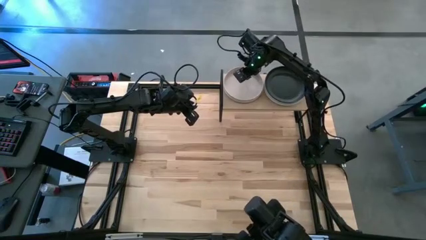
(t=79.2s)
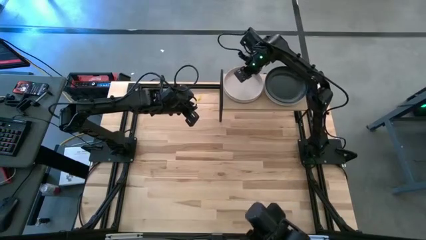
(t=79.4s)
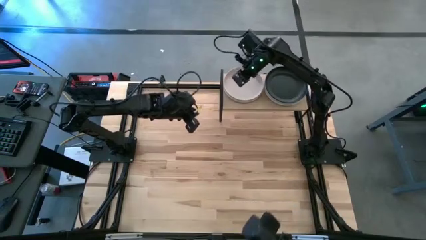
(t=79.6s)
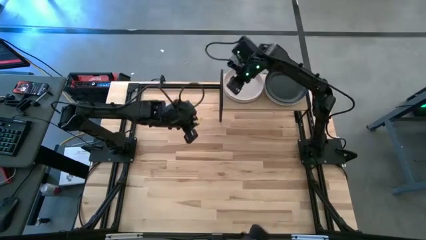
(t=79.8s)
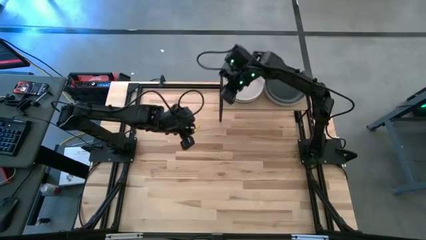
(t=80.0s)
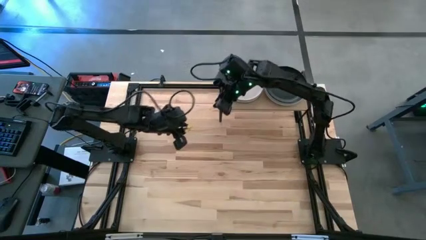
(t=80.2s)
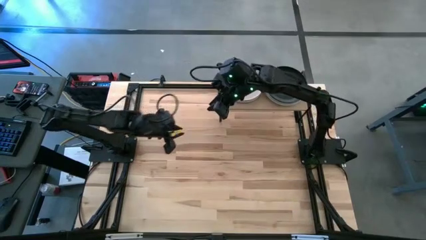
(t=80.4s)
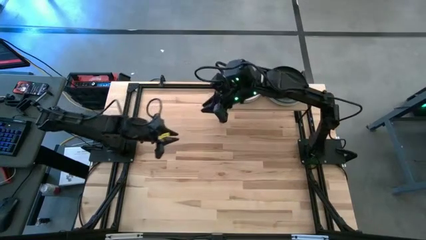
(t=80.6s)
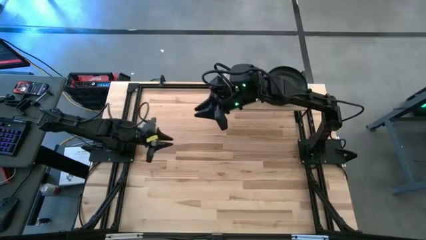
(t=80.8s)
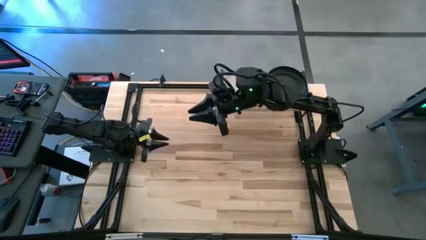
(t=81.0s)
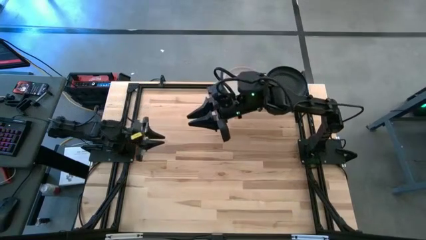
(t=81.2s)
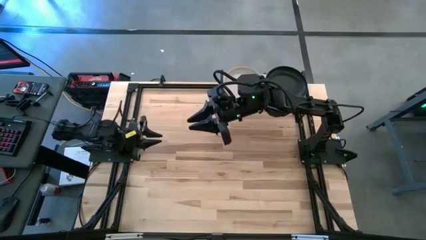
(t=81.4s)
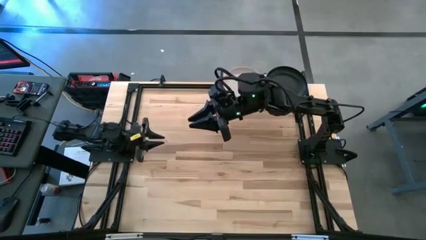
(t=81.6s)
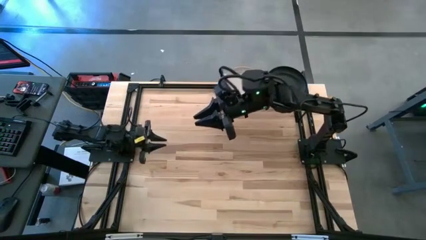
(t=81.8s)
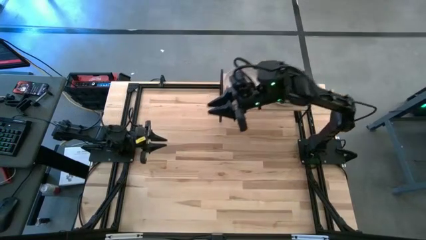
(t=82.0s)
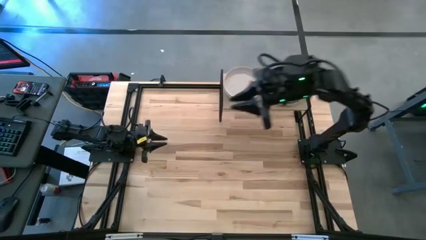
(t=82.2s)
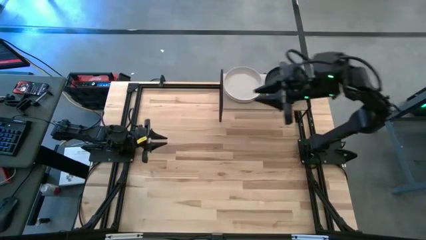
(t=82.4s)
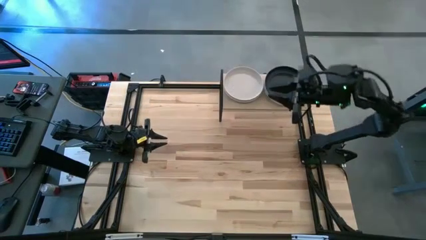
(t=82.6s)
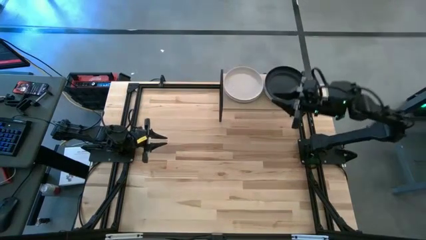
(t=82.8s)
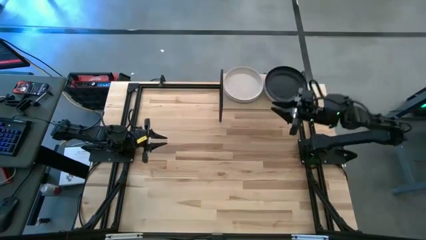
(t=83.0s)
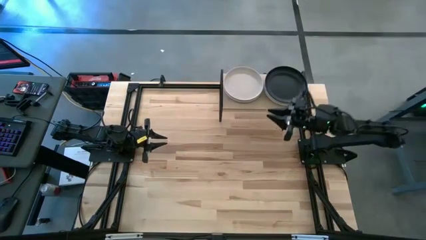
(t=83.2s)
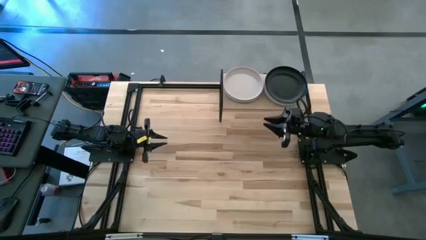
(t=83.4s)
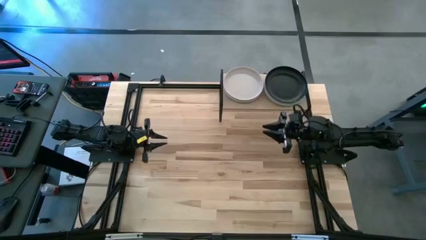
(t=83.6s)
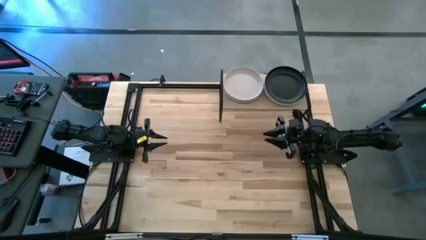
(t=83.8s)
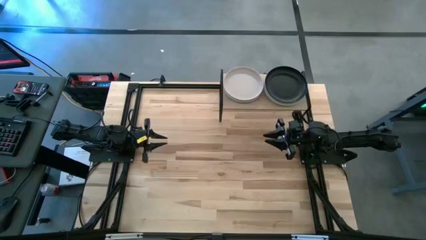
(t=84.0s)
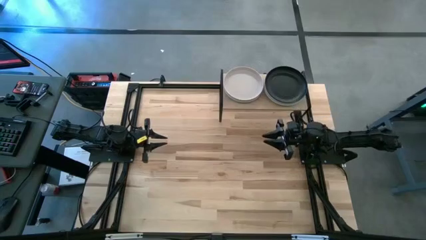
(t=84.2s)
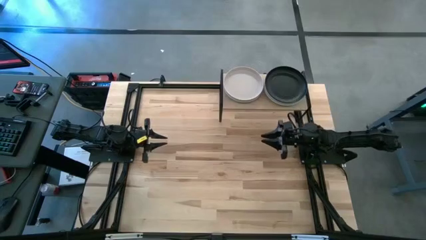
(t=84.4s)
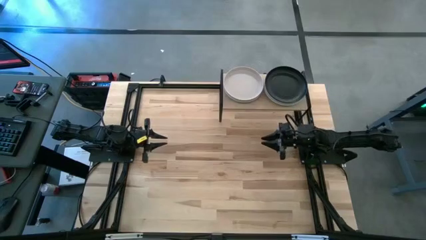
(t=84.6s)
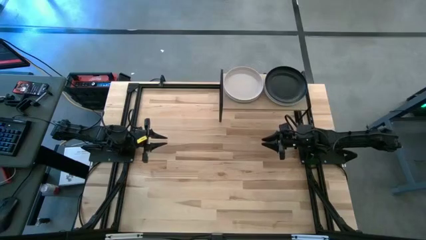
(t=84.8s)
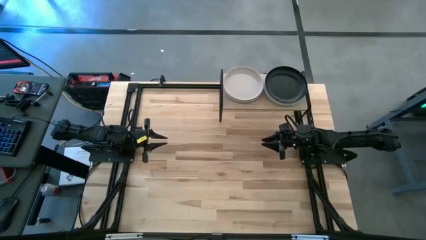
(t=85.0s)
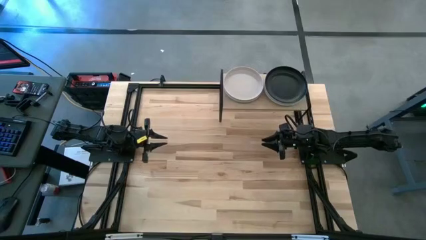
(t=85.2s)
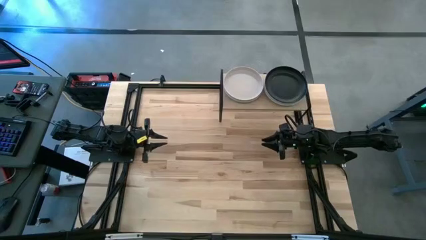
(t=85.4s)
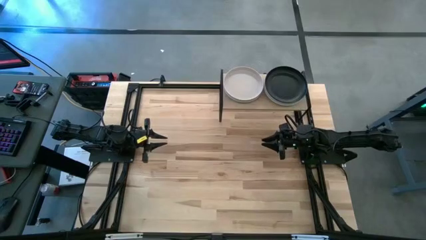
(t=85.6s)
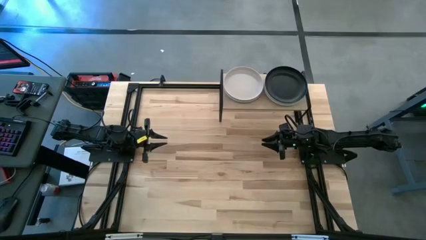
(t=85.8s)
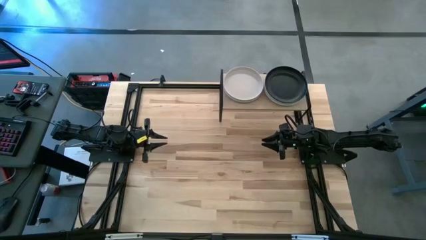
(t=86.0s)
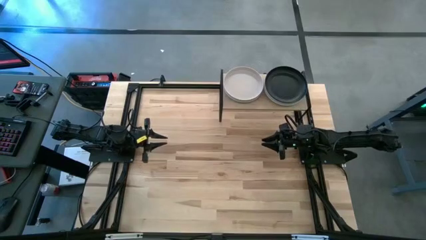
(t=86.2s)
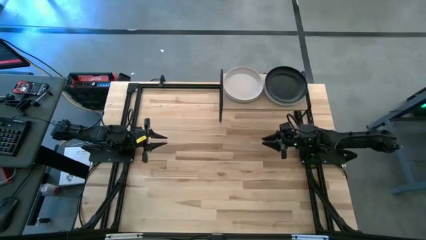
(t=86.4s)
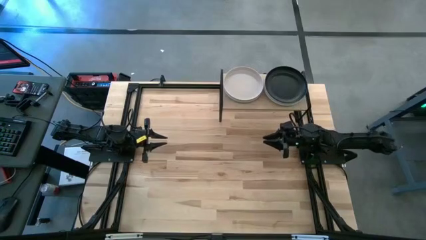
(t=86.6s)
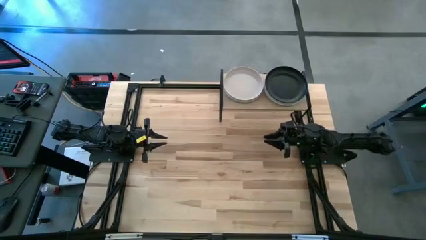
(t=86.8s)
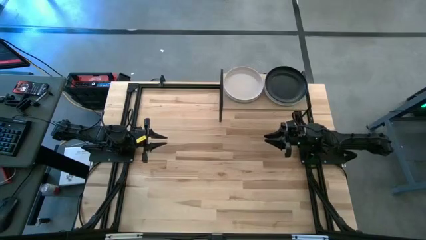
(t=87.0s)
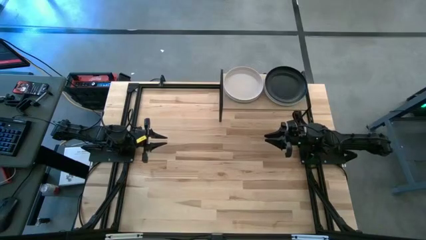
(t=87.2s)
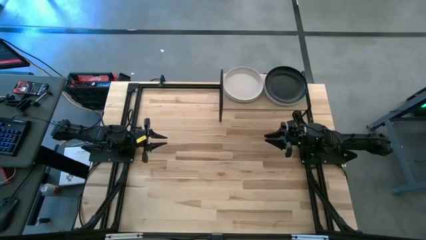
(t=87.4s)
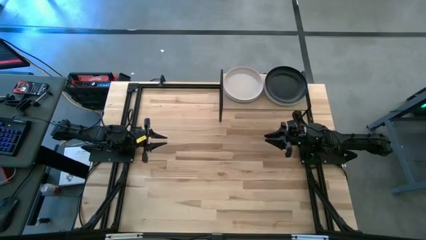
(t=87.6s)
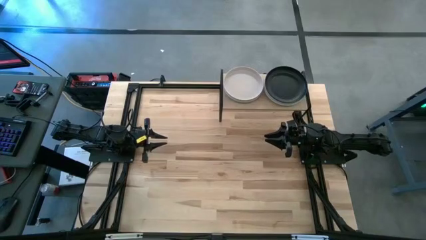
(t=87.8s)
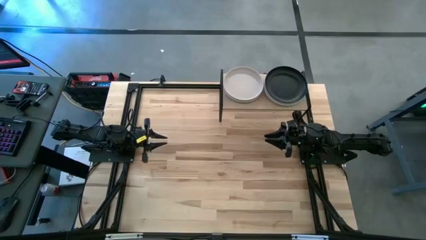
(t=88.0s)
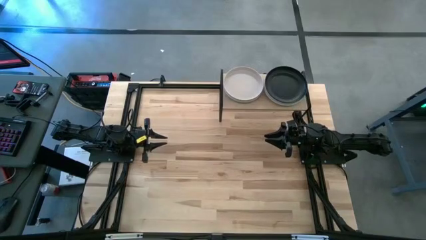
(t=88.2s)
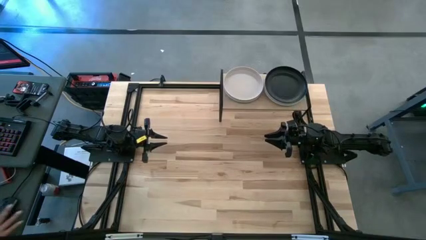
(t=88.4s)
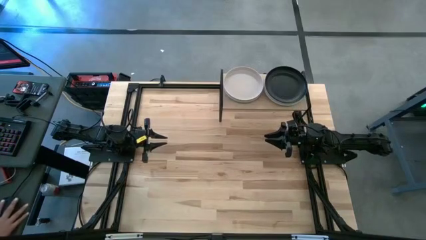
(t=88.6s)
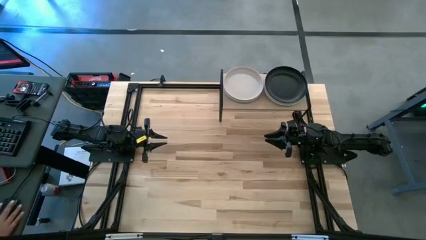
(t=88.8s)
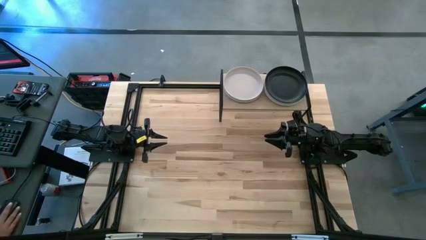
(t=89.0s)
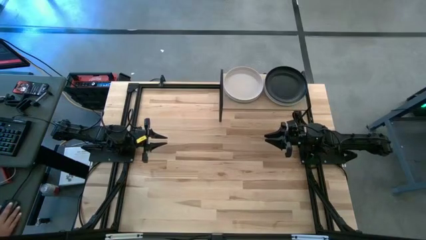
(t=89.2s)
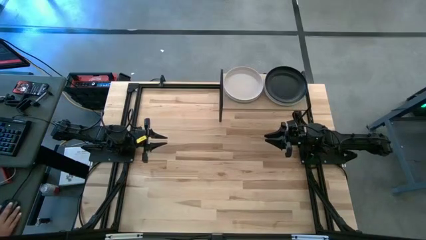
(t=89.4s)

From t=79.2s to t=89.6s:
Task: Place and stack plates onto a shelf
Return to Home Position

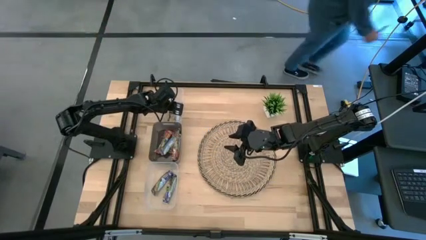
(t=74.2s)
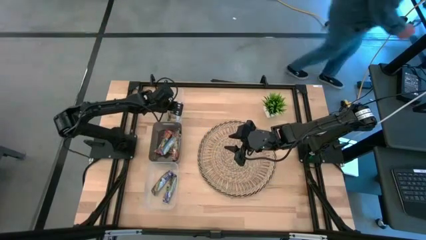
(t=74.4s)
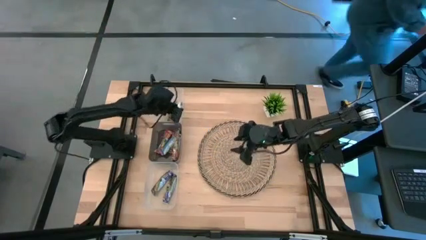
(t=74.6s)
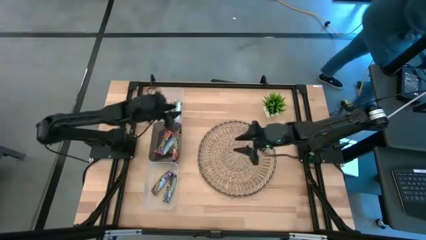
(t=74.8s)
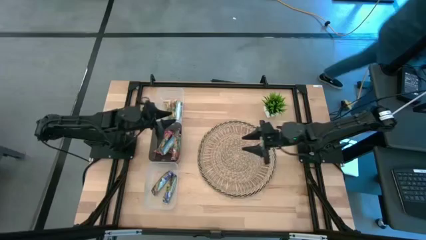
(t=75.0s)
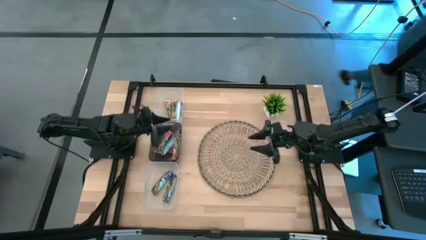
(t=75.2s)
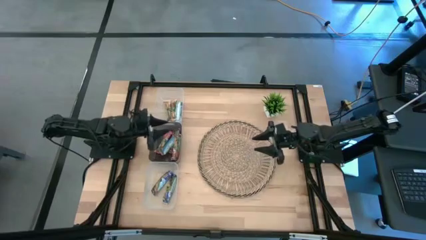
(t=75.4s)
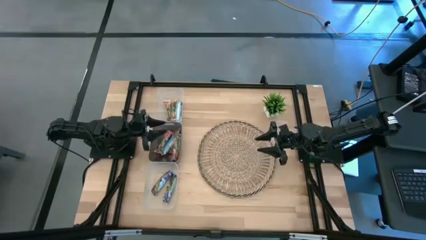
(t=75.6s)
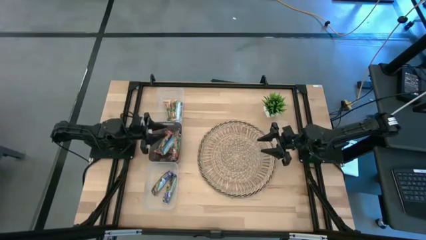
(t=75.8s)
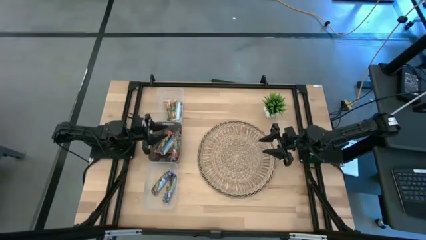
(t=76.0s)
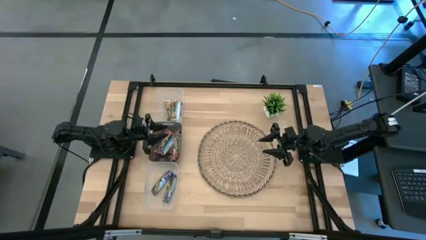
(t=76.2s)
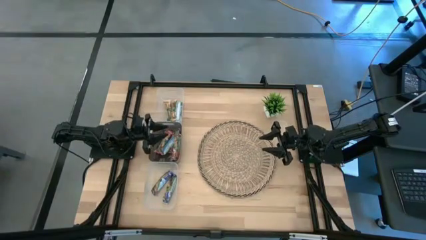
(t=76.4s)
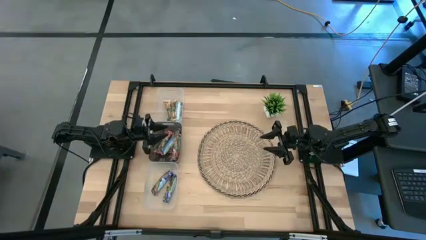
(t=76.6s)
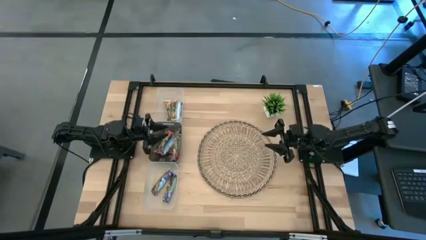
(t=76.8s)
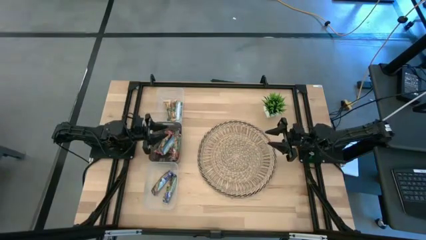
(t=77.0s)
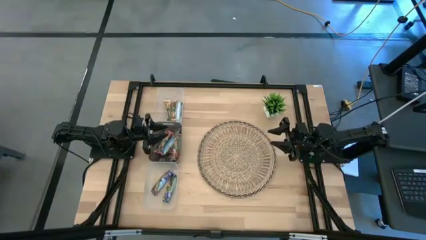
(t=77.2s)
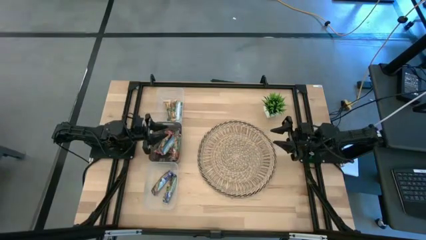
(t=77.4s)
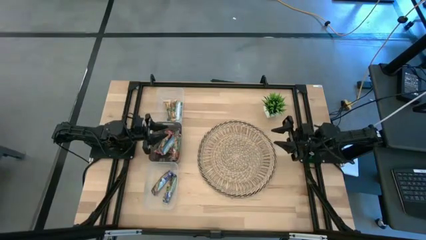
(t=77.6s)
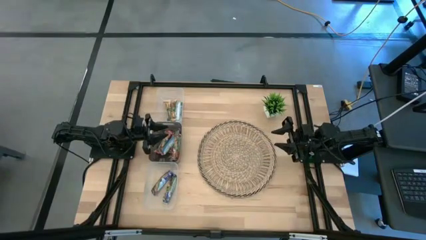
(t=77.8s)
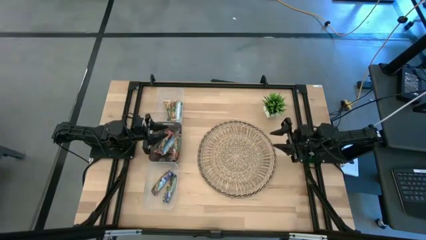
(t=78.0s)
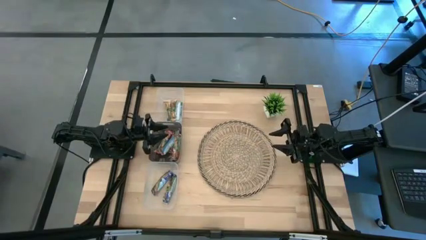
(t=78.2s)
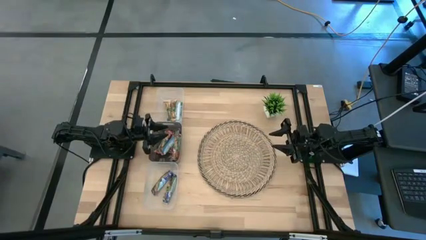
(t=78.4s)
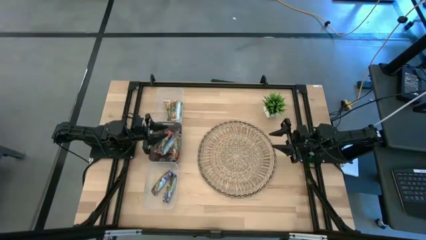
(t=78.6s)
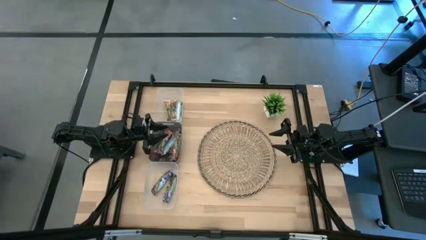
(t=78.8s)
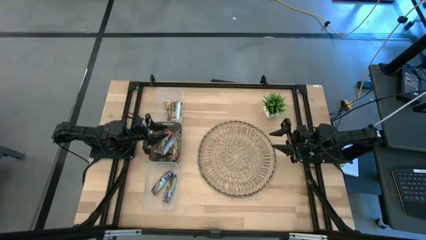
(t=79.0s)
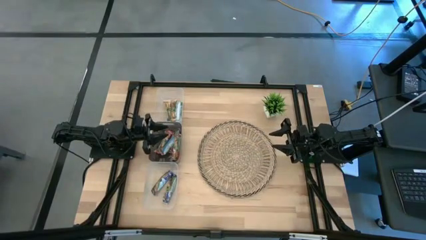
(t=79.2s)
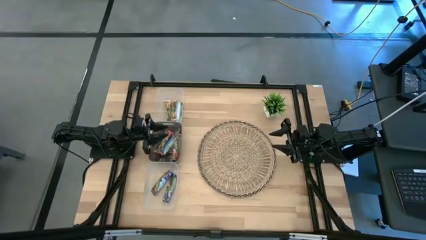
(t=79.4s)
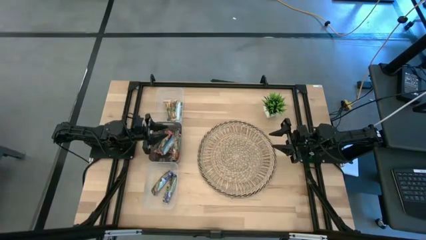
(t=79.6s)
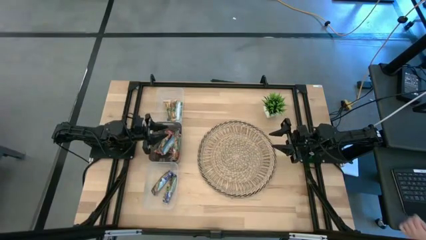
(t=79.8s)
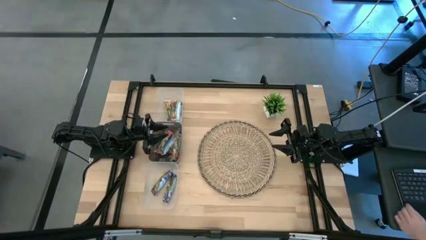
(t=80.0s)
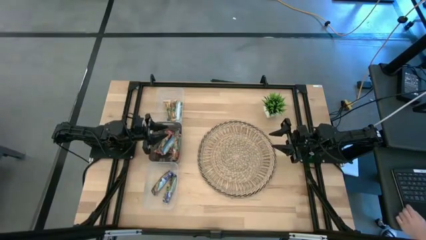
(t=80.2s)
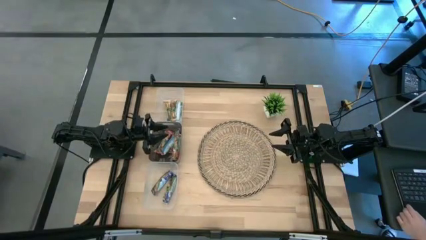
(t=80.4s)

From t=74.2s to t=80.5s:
Task: Pick and place Granola Bars by type
Return to Home Position
